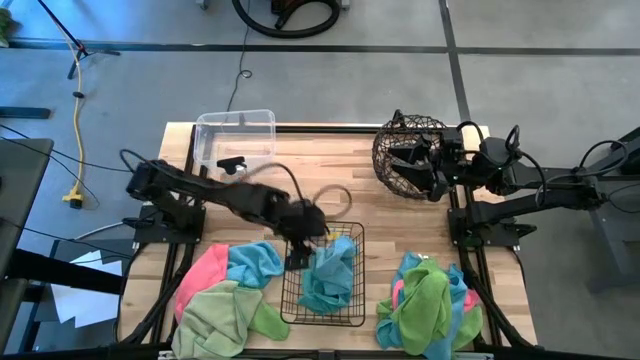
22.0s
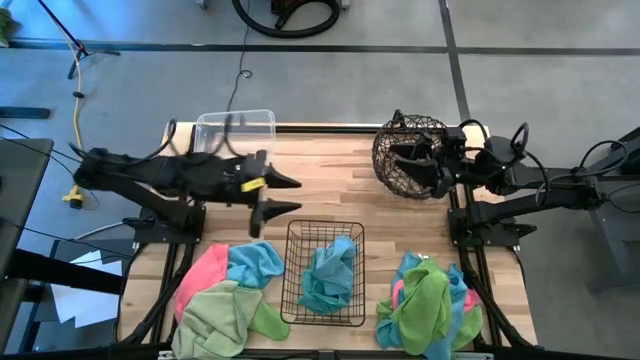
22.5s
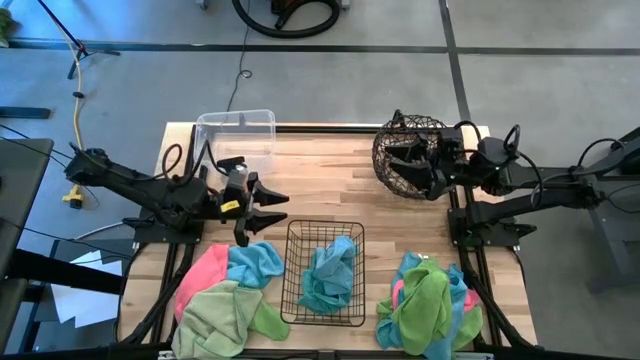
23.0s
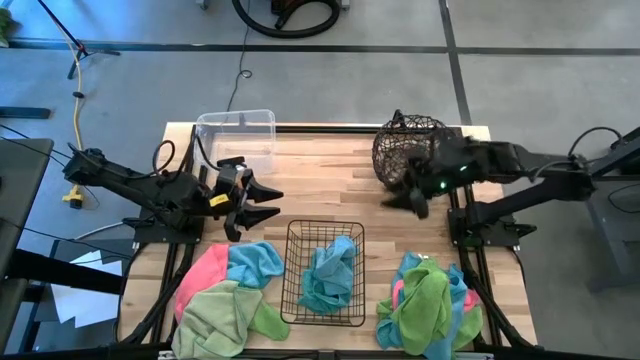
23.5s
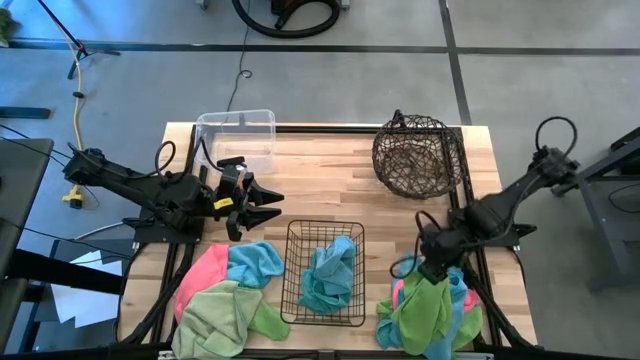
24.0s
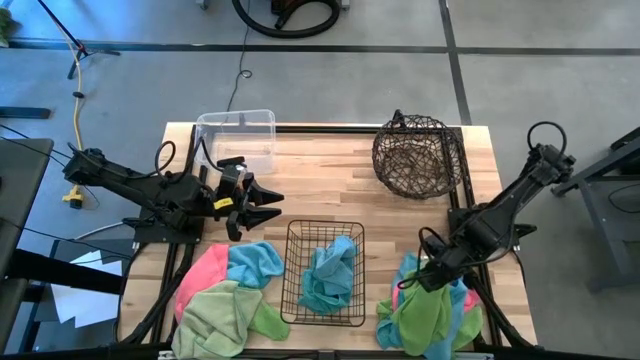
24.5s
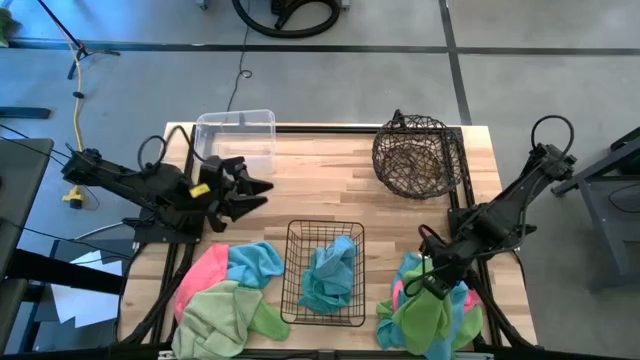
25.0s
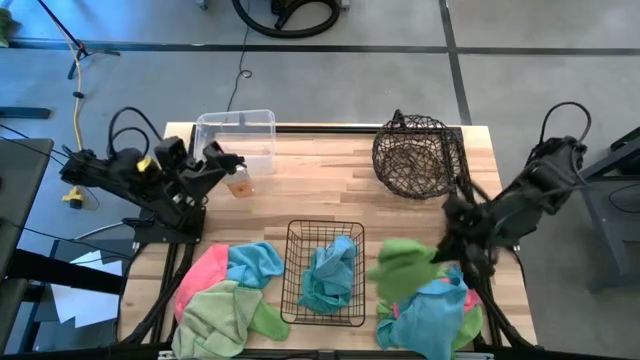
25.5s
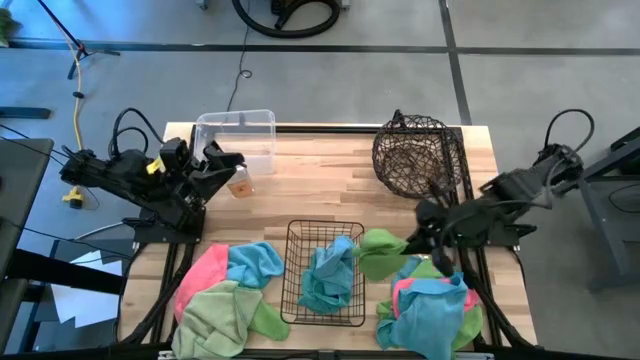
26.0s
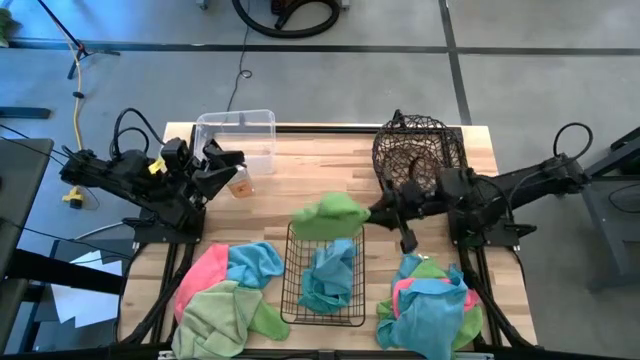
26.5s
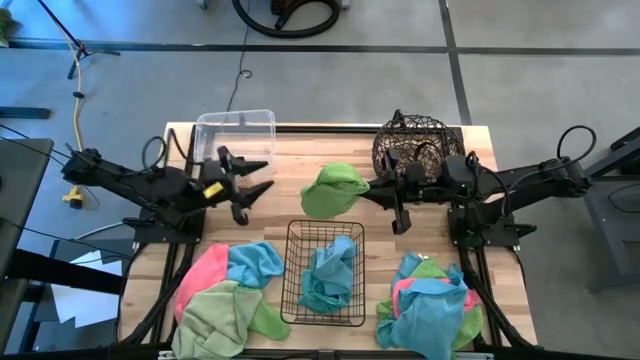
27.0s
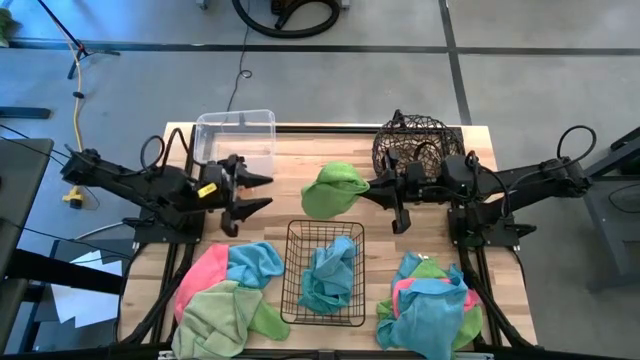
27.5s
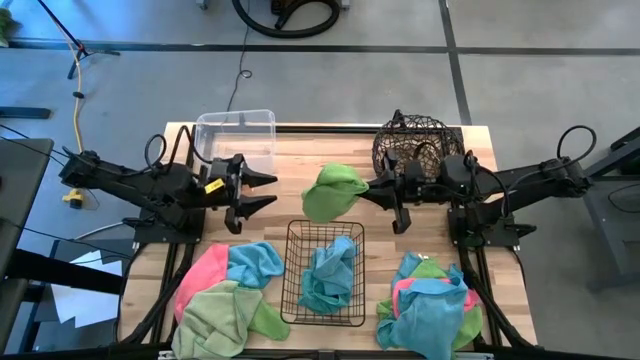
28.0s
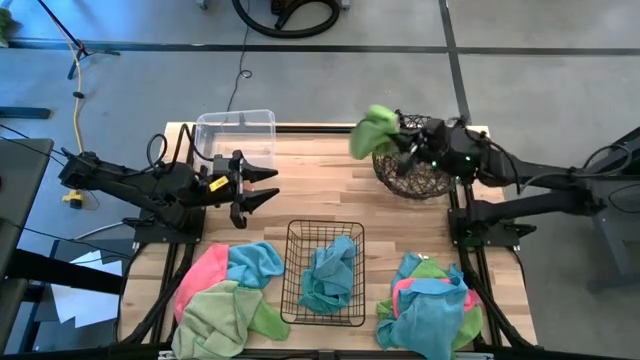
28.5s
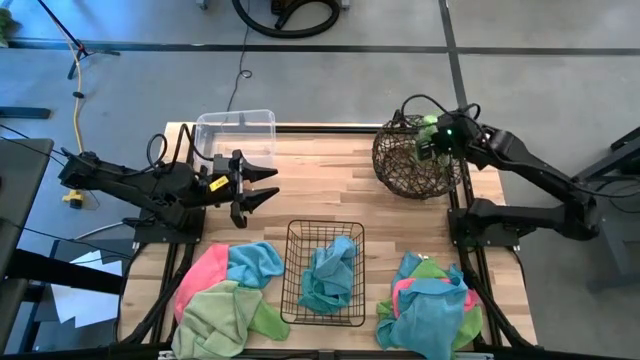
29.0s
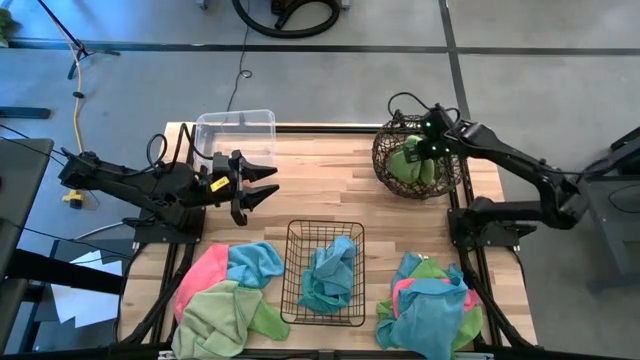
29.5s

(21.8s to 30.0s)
Task: Sort microfiber towel by color & place in baskets
Put the green towel into the top right basket

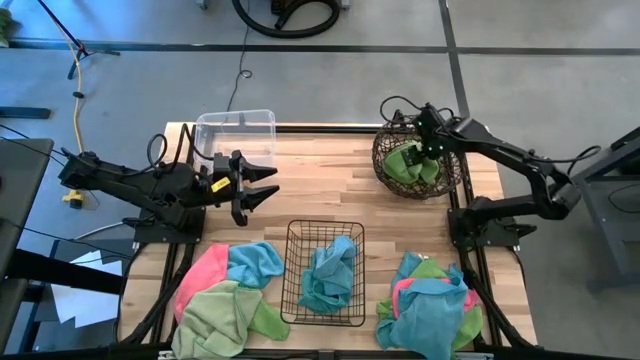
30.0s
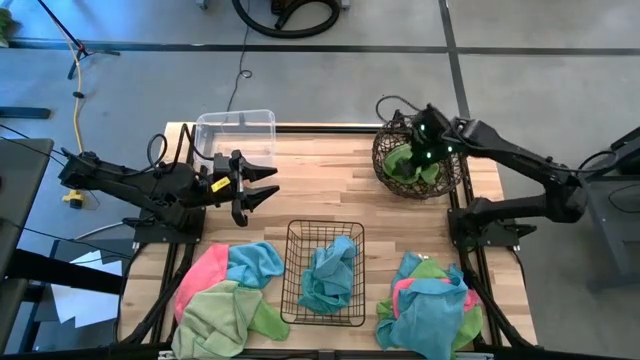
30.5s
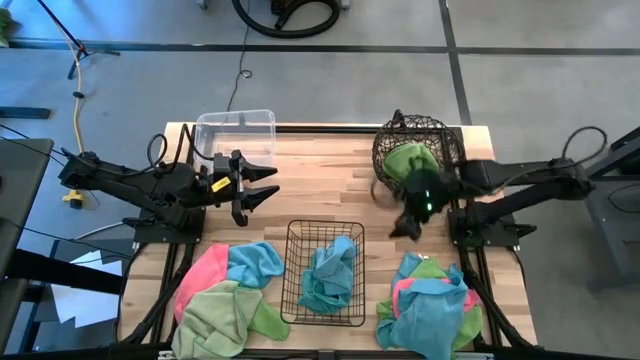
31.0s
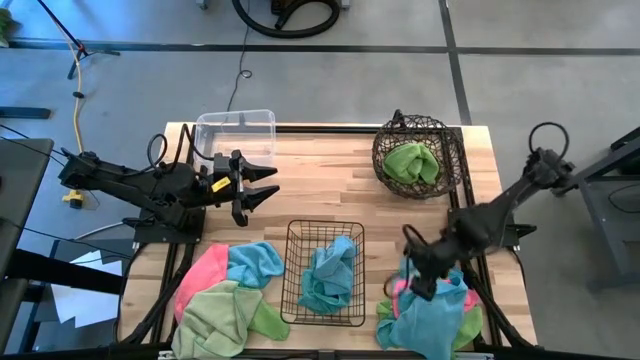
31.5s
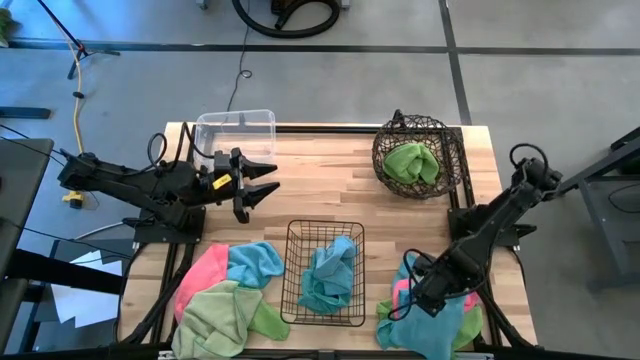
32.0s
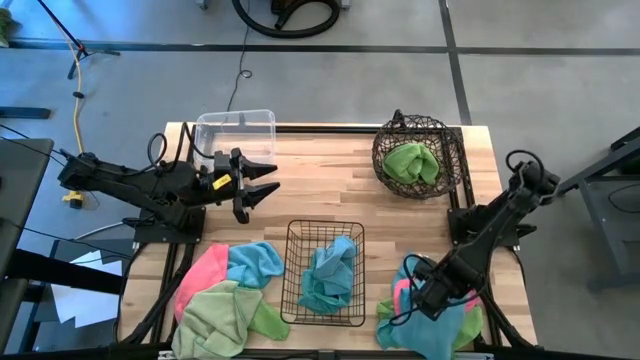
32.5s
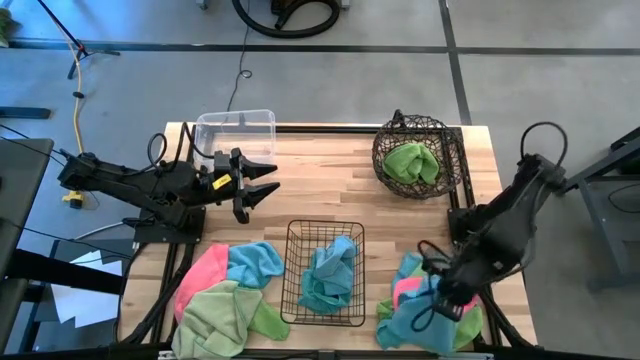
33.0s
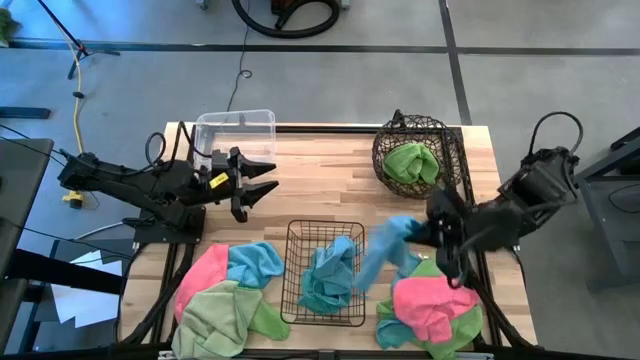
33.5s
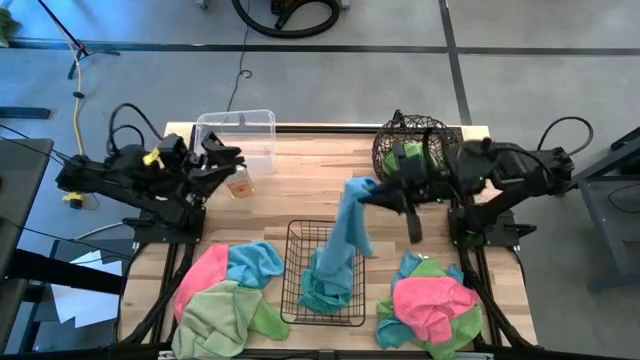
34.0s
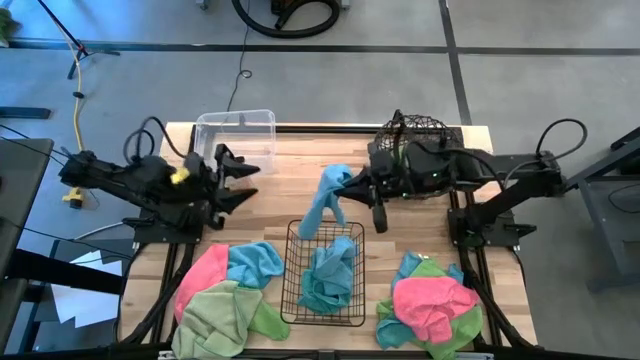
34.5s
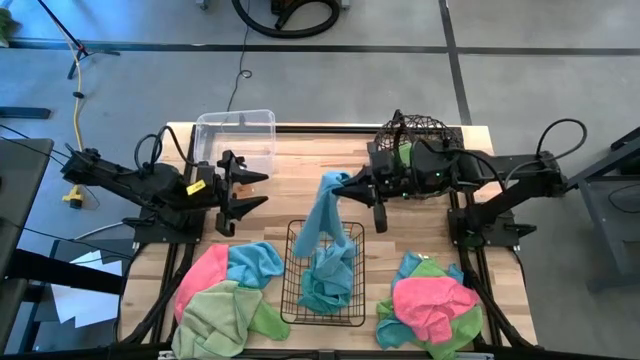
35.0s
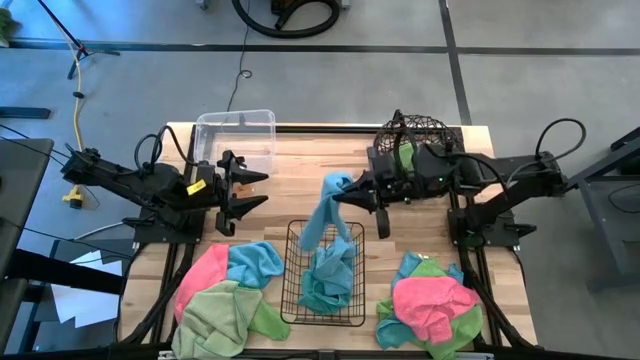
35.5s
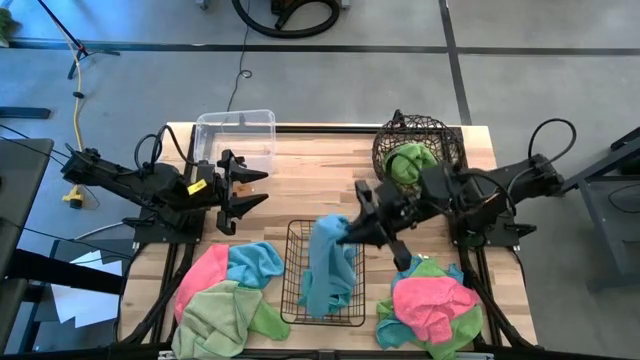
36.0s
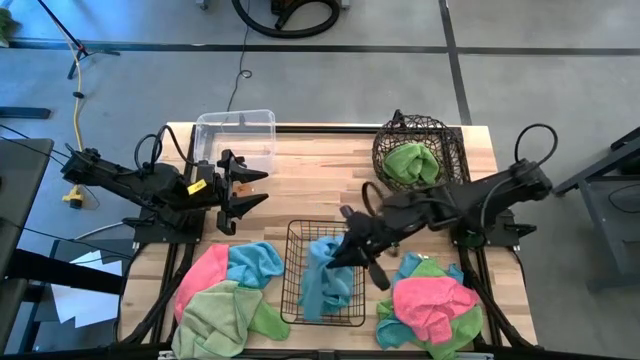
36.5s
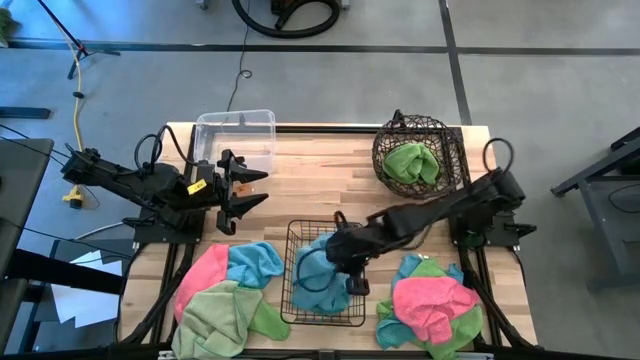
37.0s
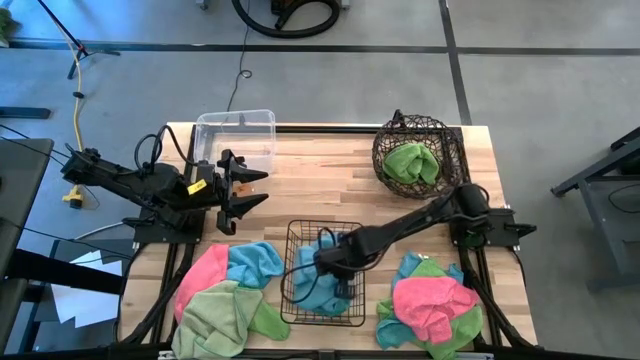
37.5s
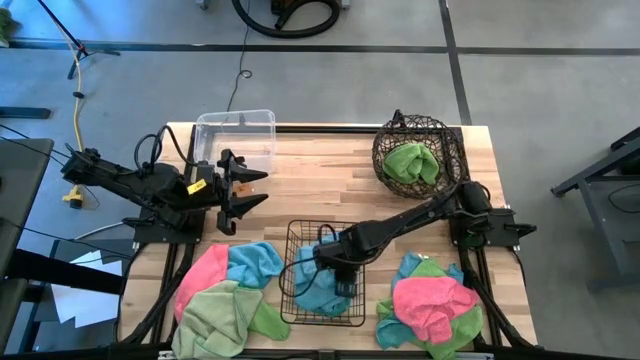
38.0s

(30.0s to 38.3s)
Put the blue towel into the bottom basket

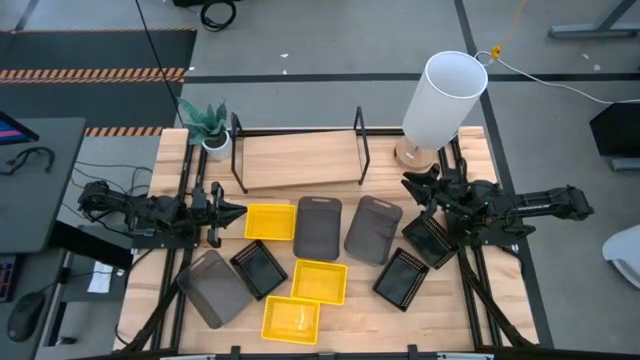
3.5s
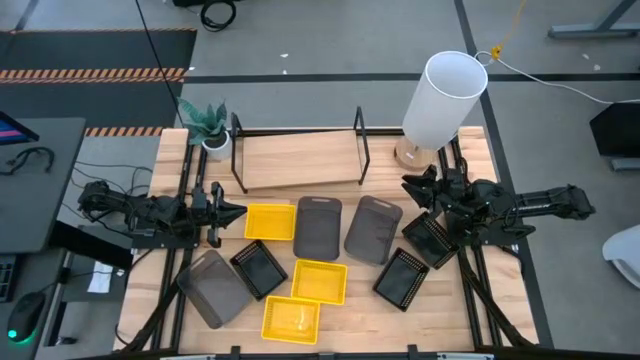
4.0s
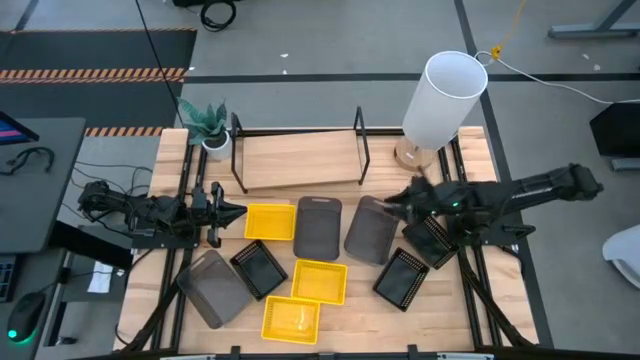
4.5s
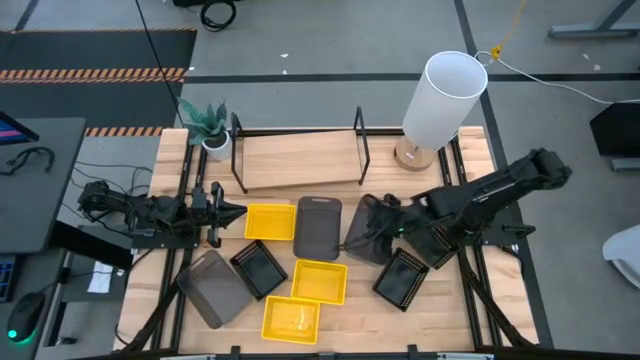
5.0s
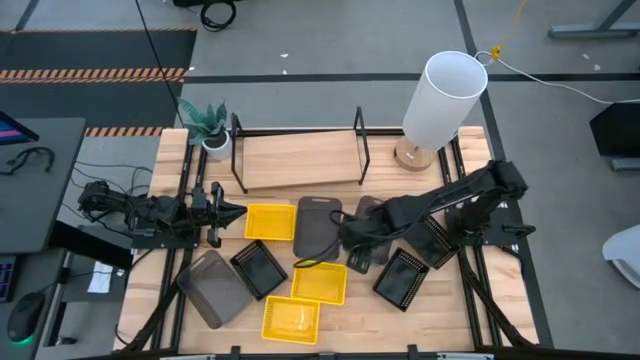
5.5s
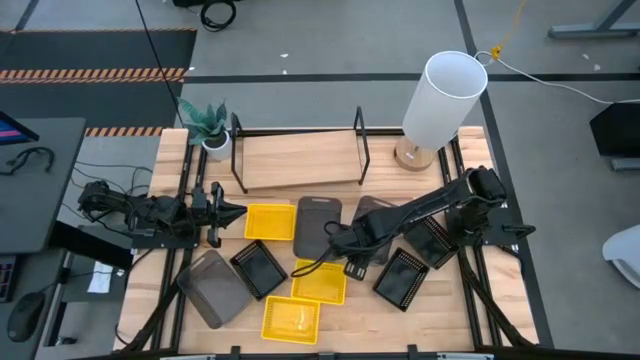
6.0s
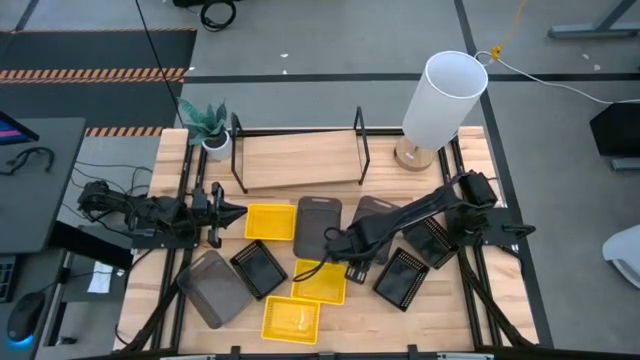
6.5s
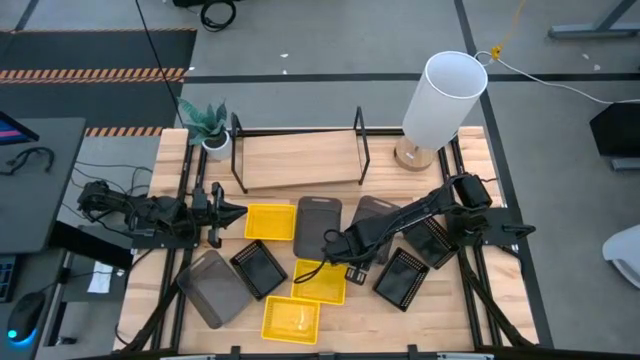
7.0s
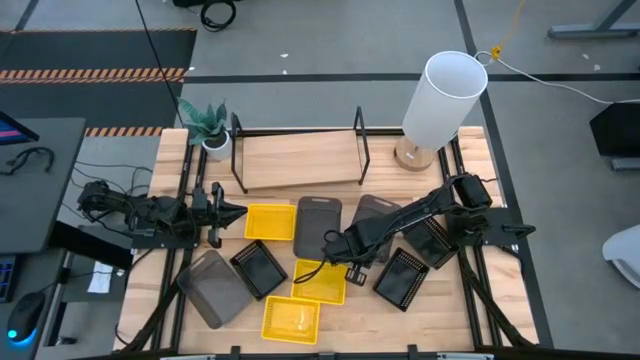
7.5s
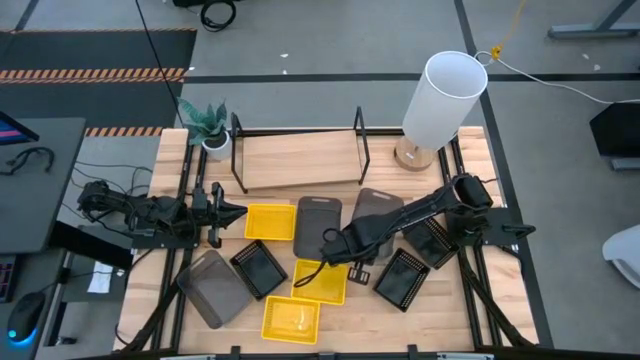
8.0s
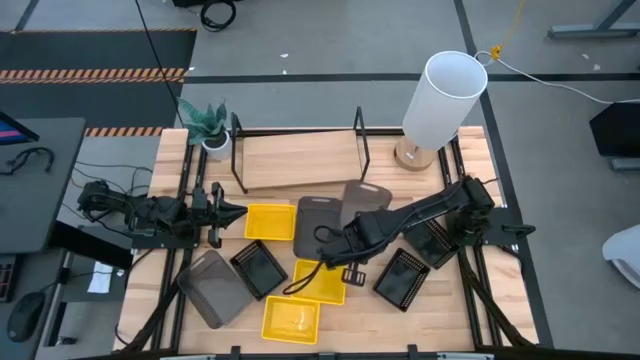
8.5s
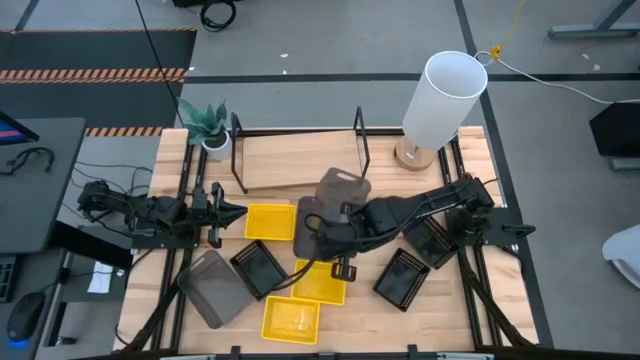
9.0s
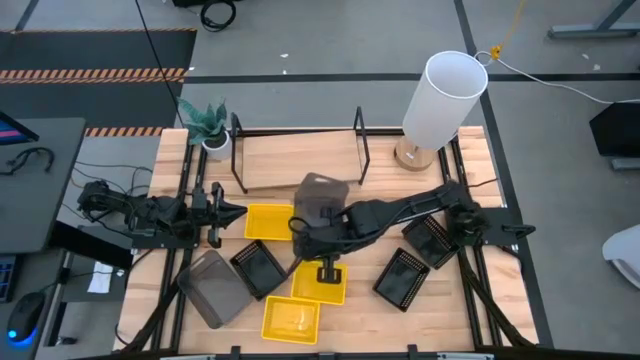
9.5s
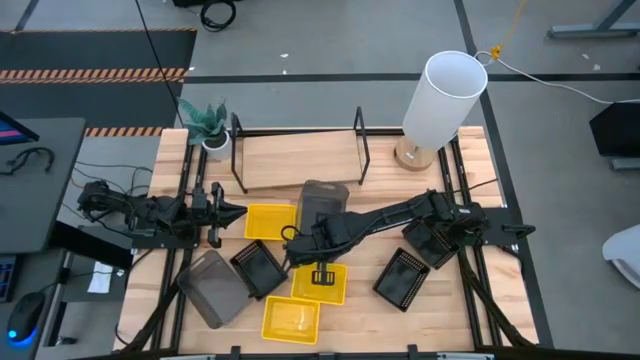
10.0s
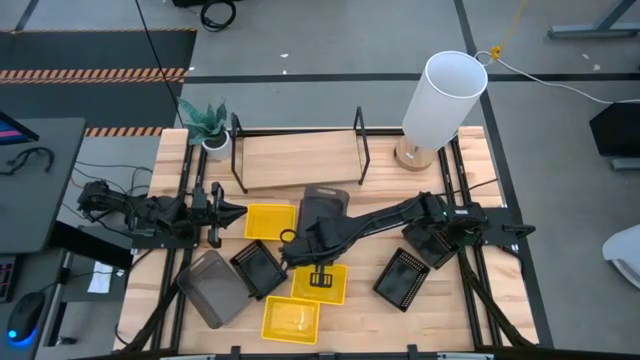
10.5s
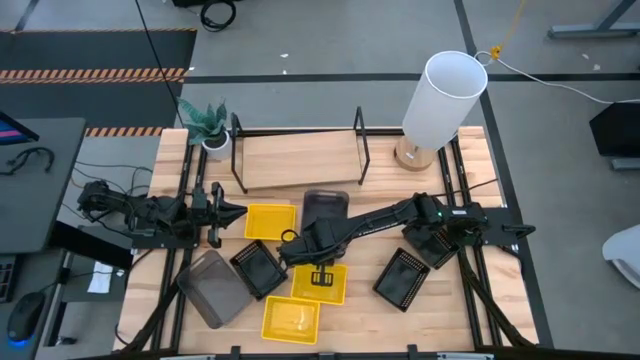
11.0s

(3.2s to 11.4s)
Task: Stack baskets on shelf by color
Stack the top right black transparent bin on the top left black transparent bin
